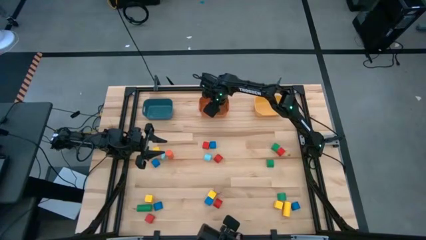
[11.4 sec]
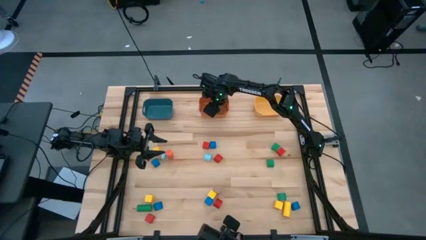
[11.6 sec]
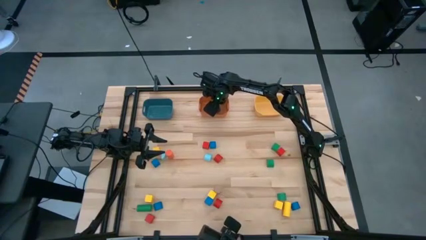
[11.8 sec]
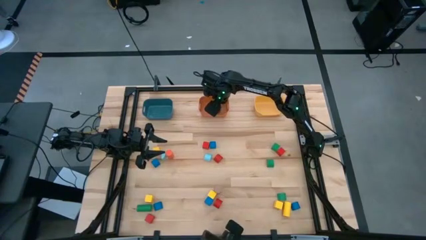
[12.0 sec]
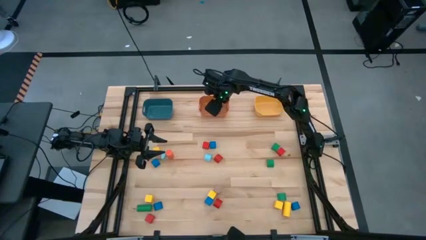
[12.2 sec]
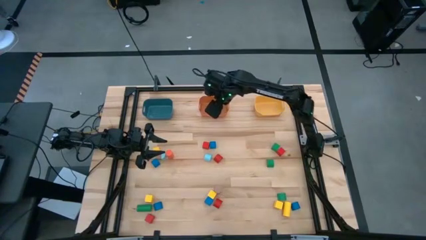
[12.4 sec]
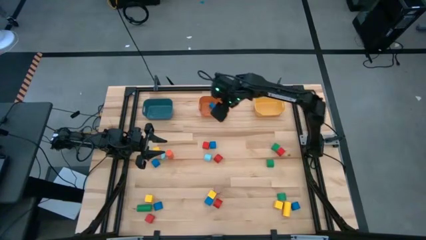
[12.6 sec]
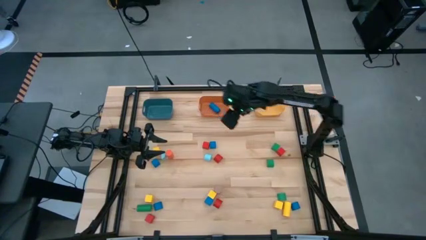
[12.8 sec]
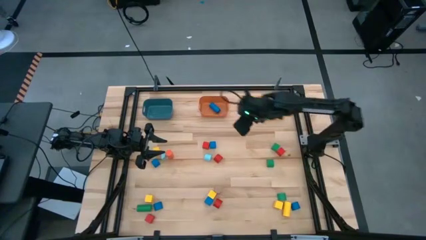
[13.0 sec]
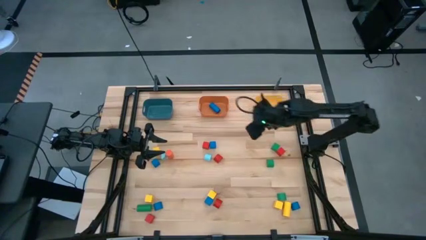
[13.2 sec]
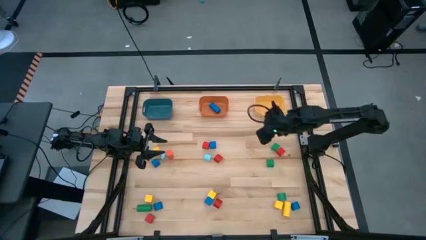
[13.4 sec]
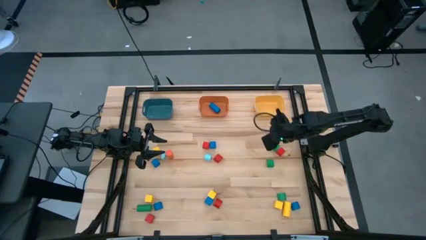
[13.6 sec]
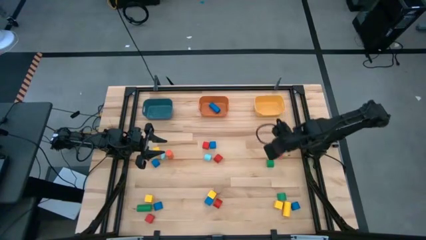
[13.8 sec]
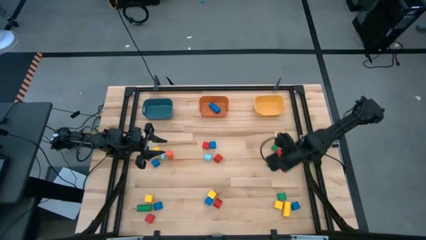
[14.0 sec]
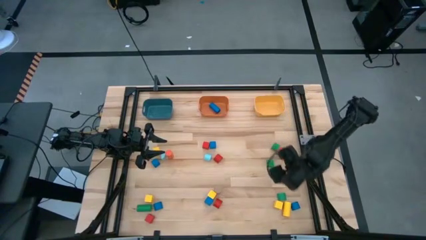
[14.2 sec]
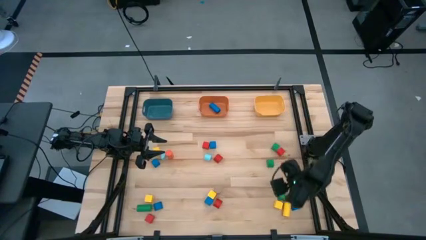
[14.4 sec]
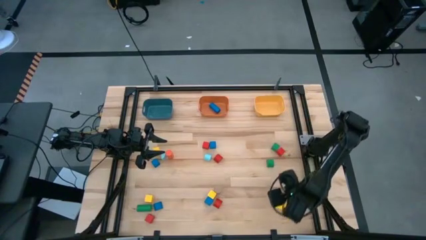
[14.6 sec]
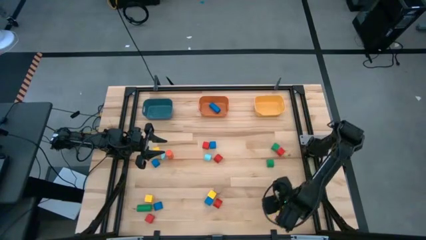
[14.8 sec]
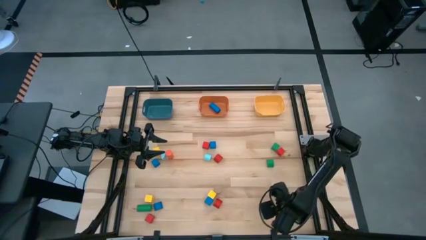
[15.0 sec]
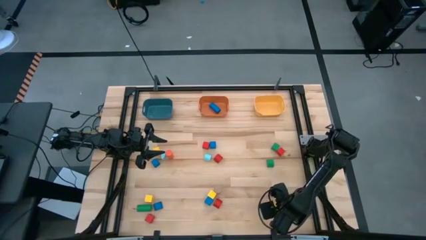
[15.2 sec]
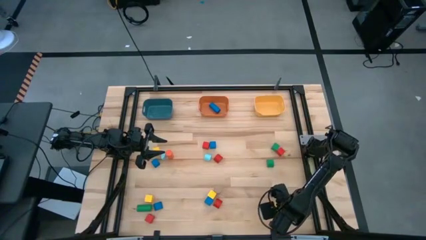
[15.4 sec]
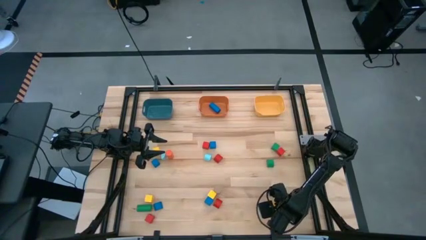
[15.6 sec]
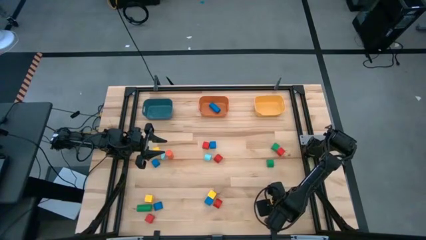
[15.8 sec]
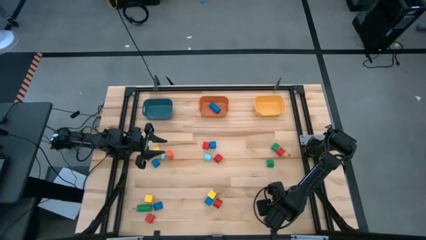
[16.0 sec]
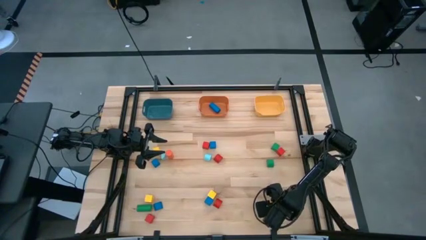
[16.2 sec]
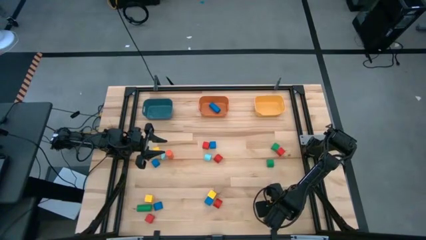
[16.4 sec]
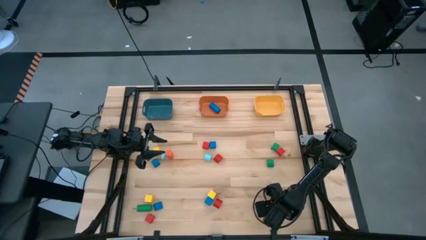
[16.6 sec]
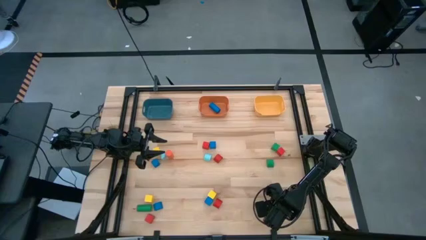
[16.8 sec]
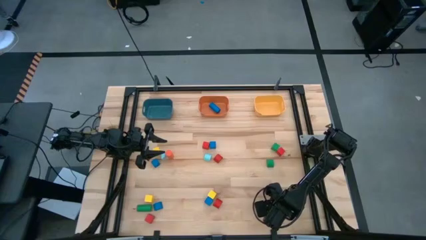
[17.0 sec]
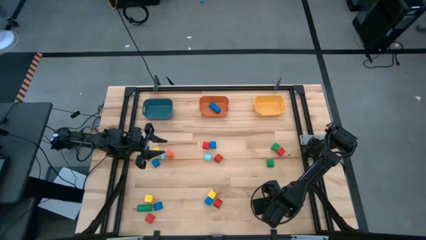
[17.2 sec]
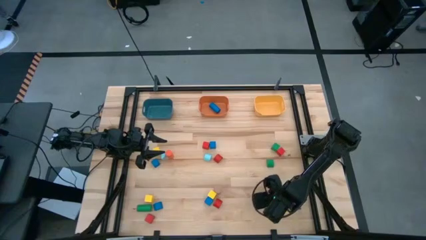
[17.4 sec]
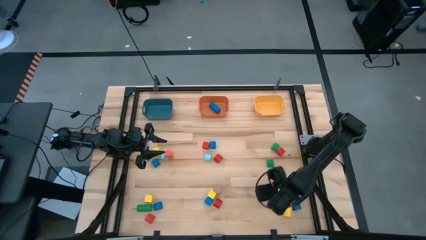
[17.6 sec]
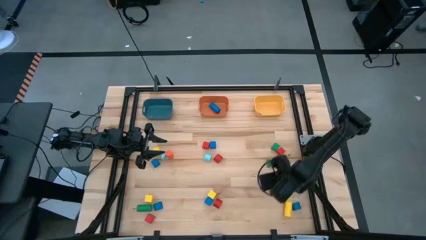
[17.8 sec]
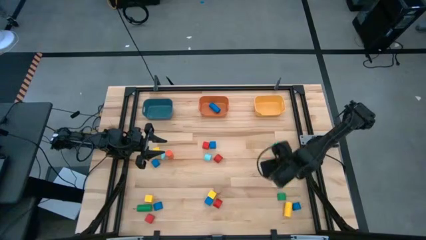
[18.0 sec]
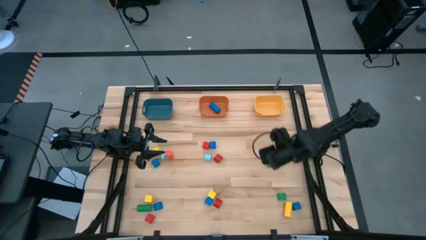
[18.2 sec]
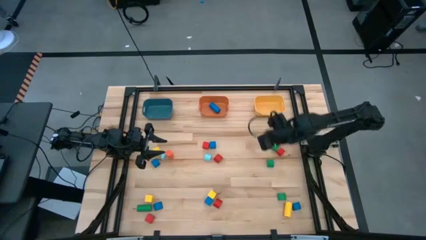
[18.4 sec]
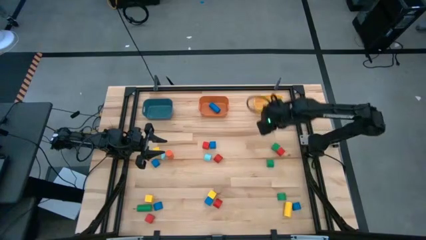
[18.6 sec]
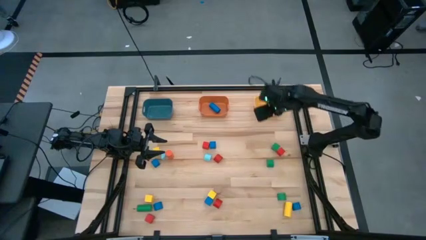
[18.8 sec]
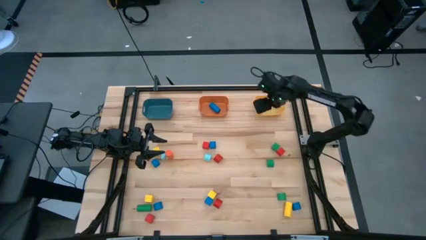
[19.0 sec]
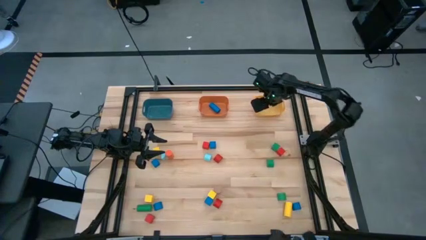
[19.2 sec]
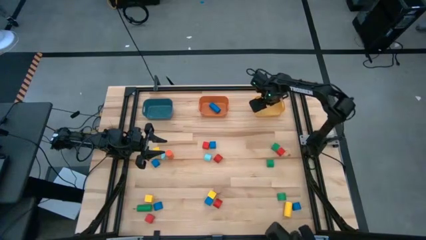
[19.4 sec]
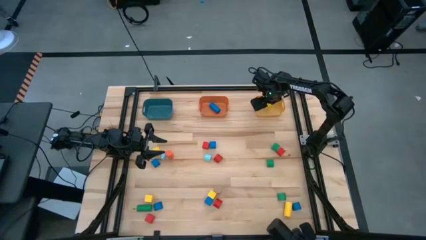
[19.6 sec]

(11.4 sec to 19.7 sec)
Task: Sort blocks by size
Put the yellow cube block into the yellow bin

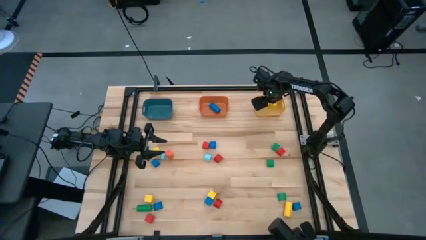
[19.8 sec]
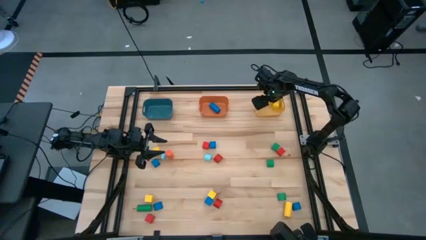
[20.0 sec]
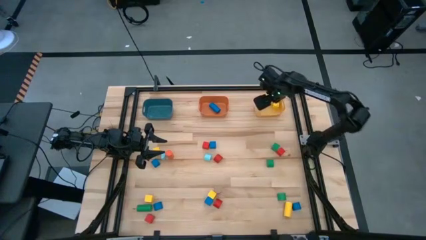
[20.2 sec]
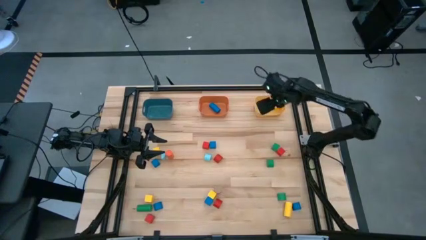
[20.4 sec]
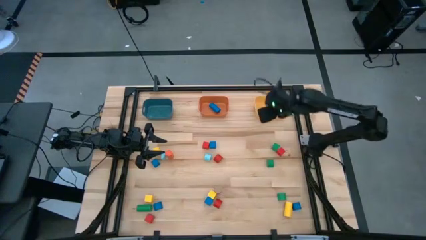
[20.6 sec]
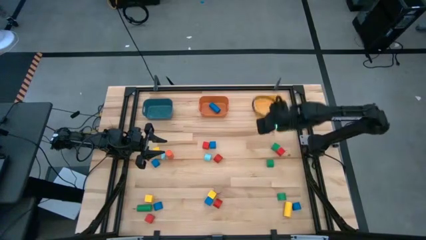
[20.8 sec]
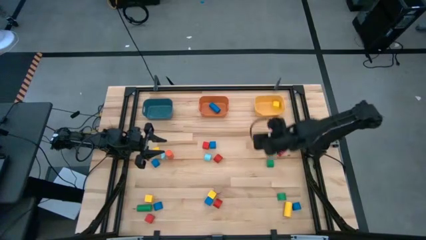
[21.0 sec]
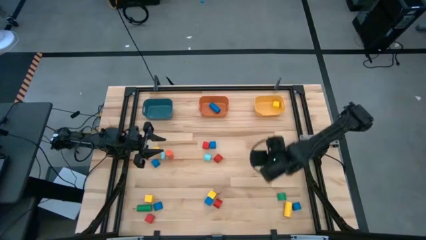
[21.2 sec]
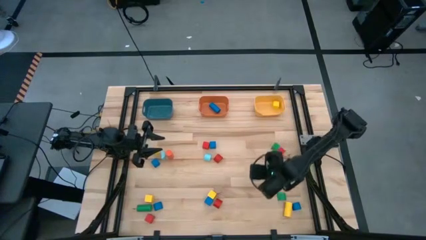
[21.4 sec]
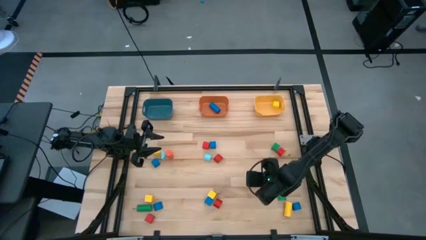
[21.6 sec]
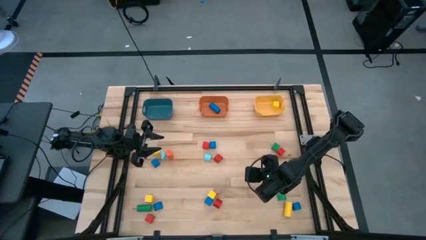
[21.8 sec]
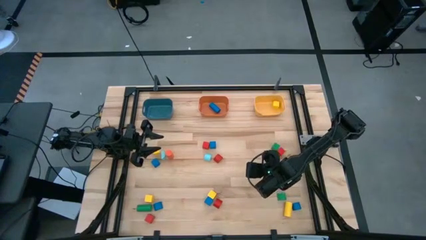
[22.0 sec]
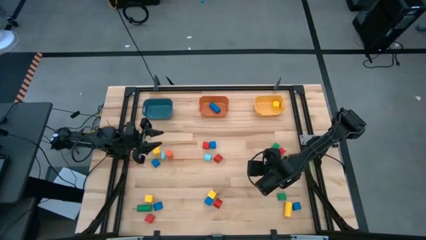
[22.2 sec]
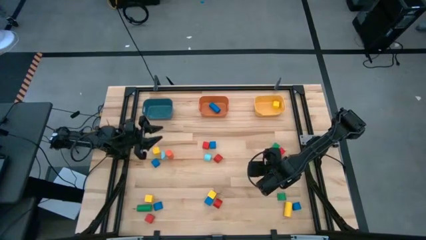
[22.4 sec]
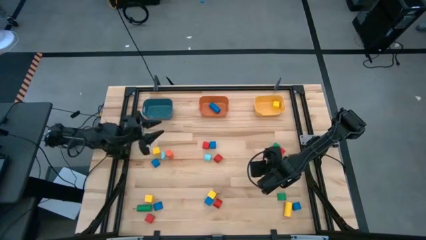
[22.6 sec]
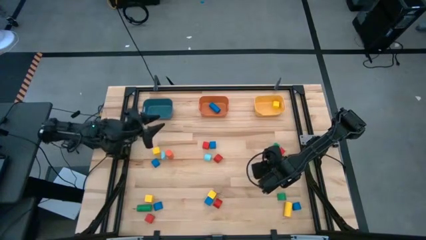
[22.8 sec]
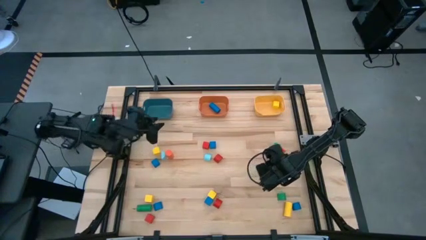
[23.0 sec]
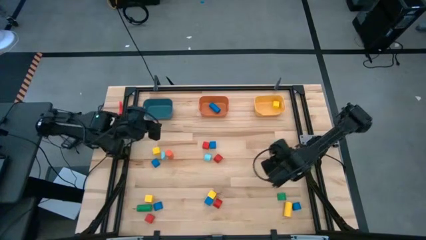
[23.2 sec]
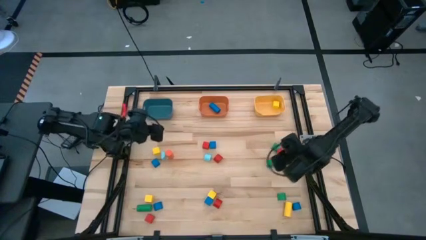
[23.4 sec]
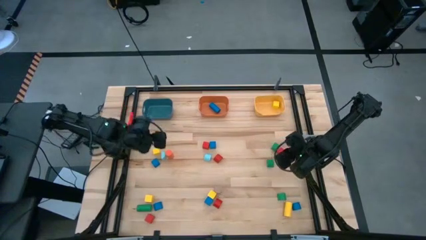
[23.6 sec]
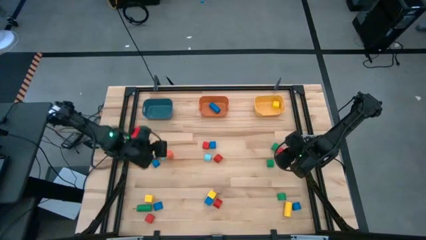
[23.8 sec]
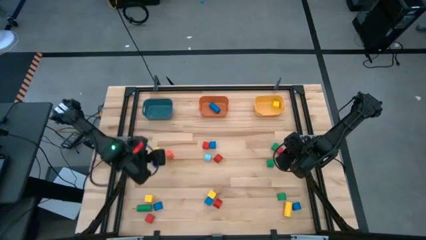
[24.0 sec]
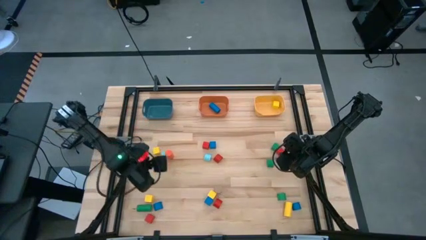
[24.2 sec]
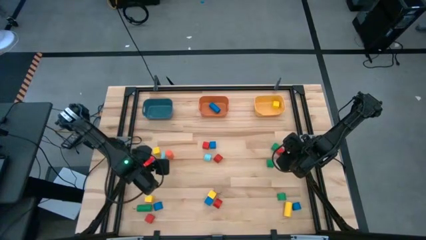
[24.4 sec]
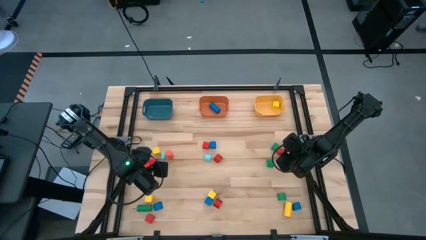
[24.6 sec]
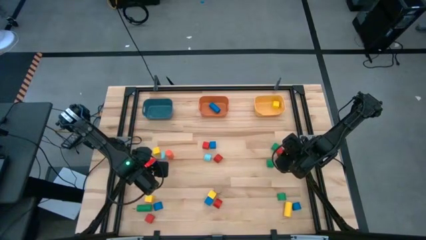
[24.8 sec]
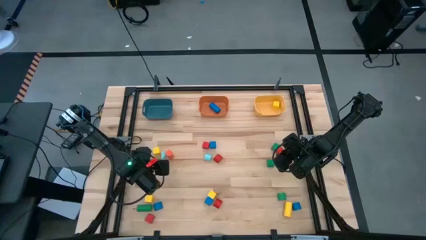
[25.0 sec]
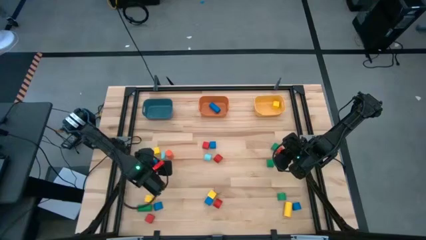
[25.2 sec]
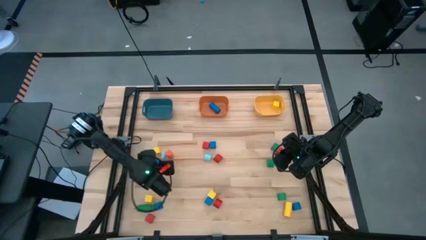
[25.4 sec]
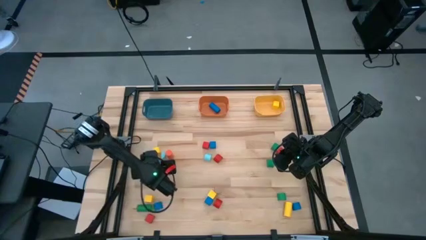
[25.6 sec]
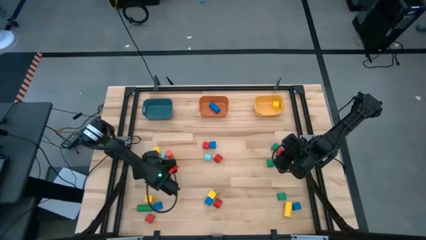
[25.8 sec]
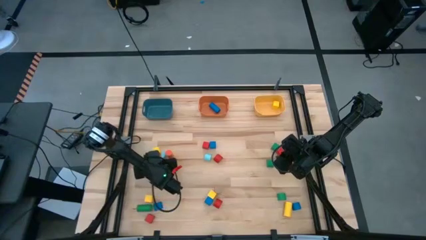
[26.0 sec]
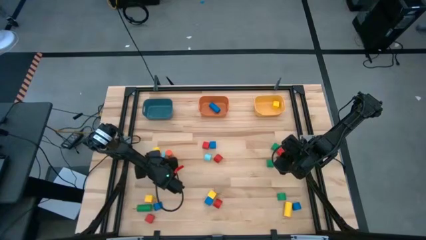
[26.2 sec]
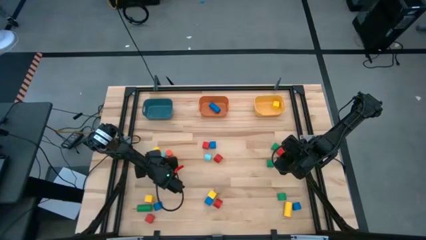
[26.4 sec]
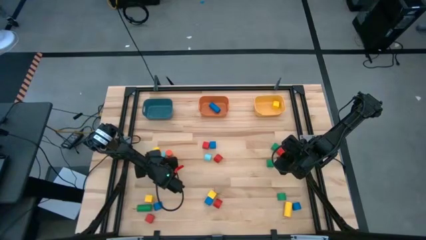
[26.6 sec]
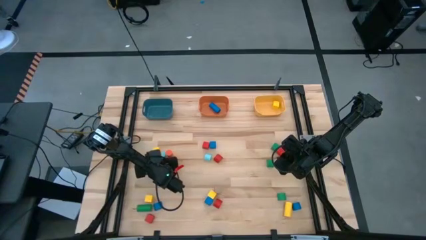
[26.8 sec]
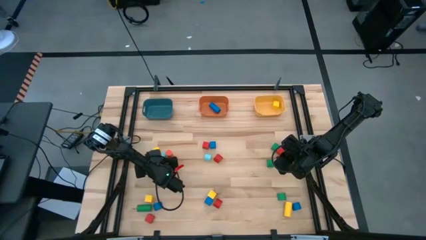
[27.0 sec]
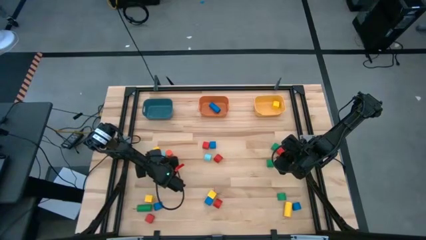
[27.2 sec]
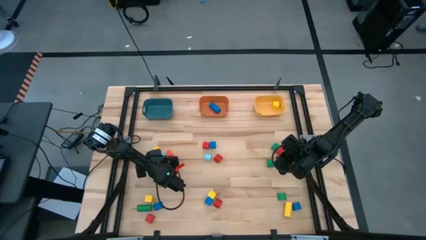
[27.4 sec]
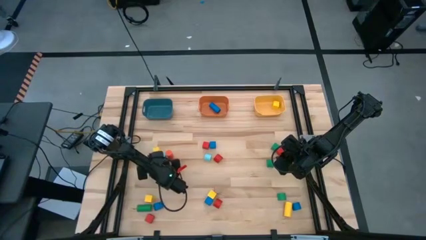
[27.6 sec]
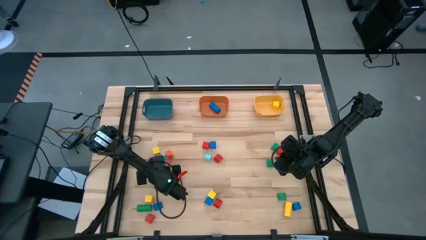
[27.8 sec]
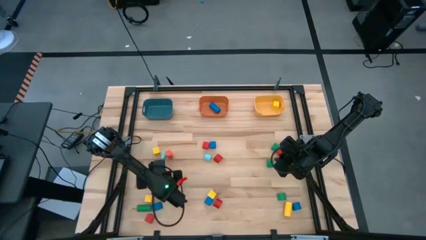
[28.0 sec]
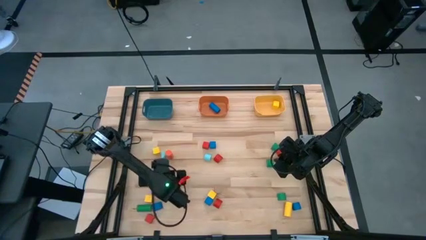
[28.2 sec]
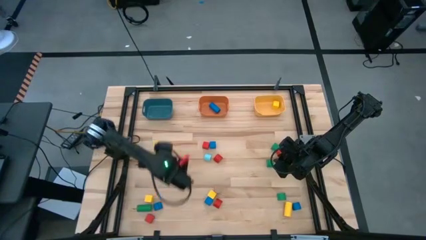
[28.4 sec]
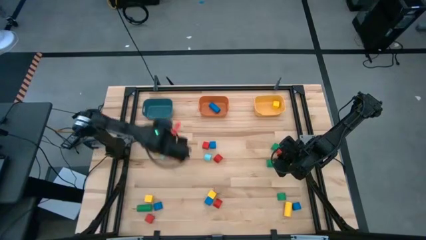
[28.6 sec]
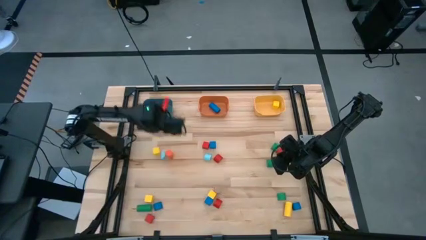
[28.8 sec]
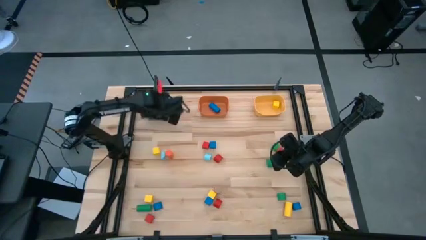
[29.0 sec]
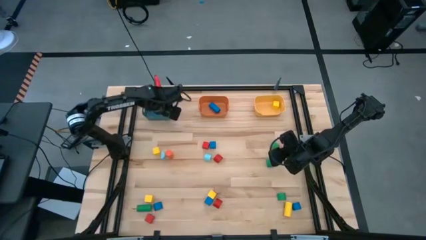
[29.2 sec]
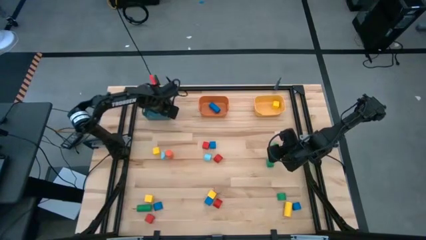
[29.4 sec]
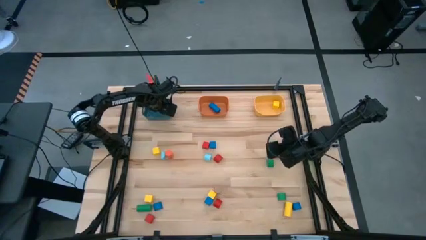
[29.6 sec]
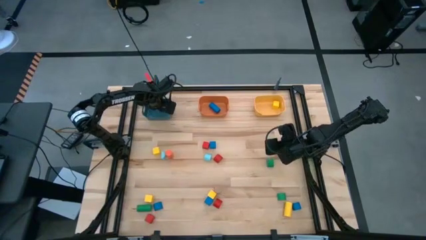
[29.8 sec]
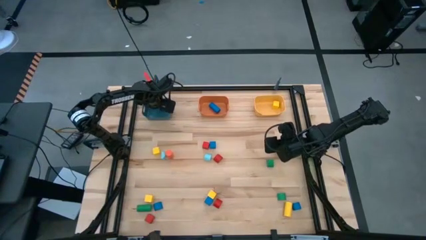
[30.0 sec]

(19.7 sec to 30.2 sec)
Put the blue half-circle block into the blue bin
